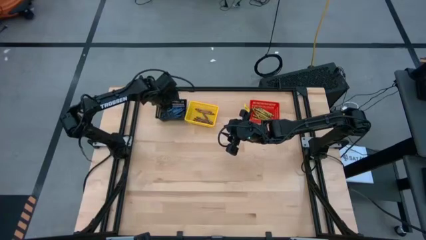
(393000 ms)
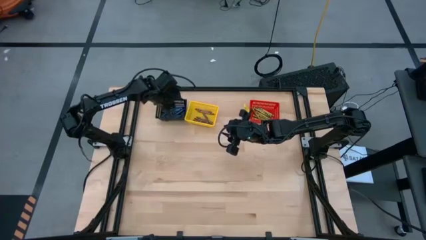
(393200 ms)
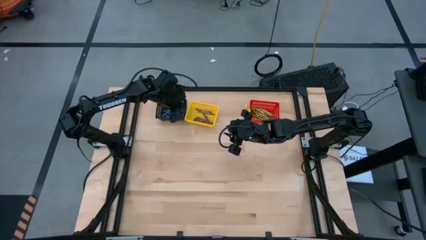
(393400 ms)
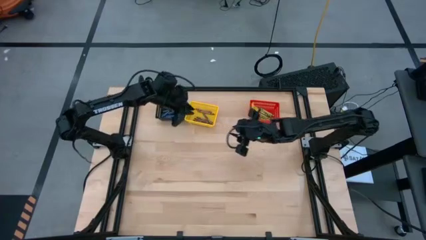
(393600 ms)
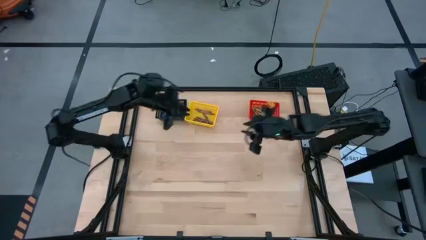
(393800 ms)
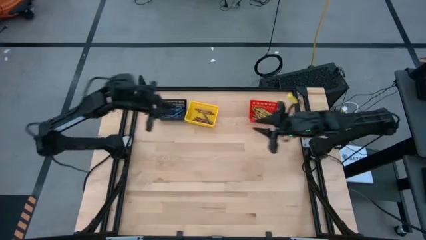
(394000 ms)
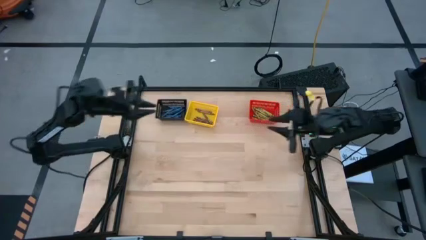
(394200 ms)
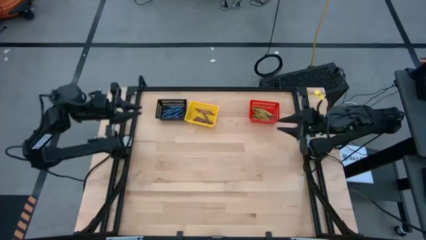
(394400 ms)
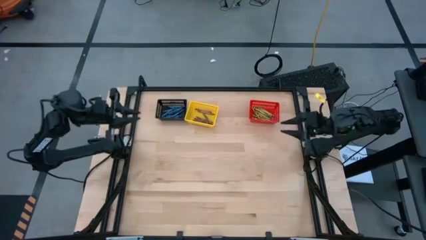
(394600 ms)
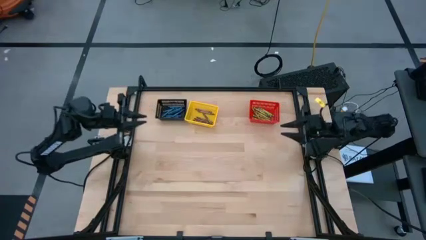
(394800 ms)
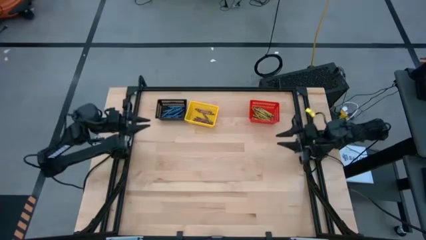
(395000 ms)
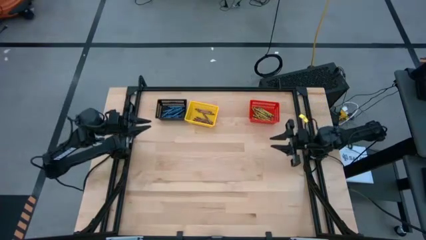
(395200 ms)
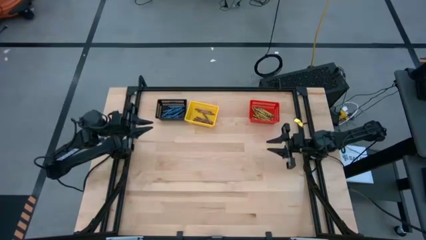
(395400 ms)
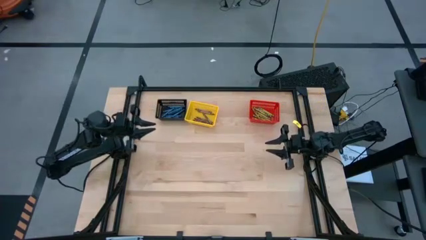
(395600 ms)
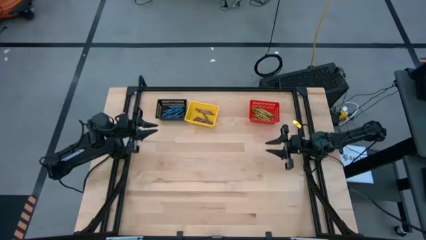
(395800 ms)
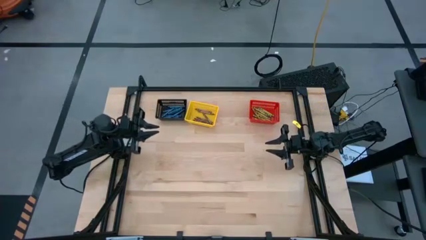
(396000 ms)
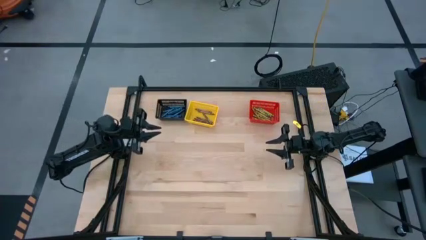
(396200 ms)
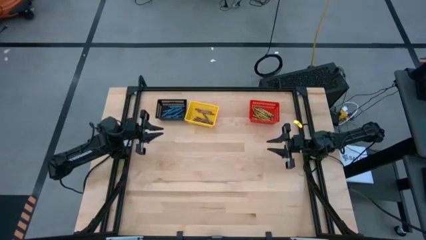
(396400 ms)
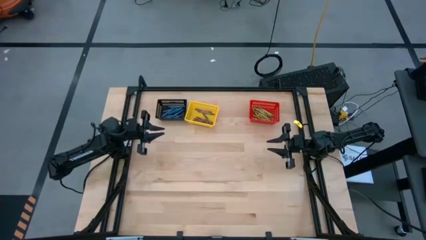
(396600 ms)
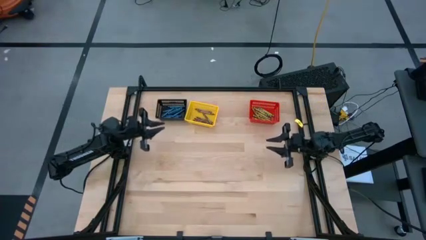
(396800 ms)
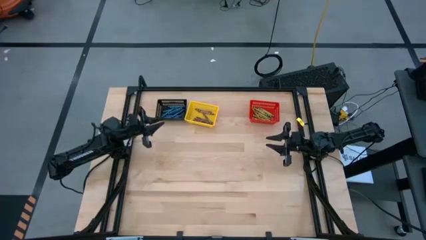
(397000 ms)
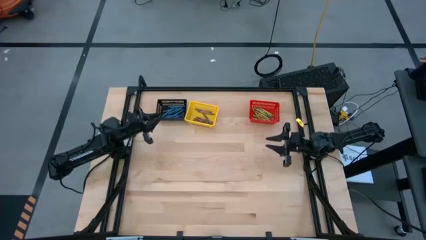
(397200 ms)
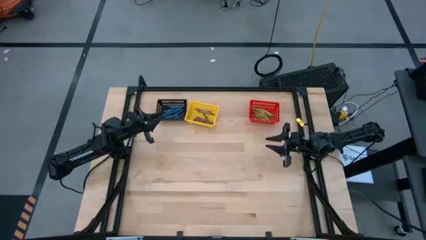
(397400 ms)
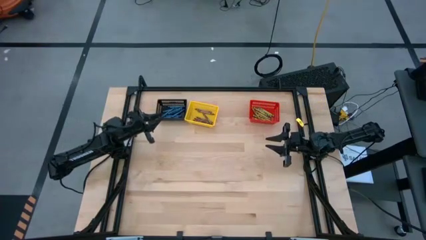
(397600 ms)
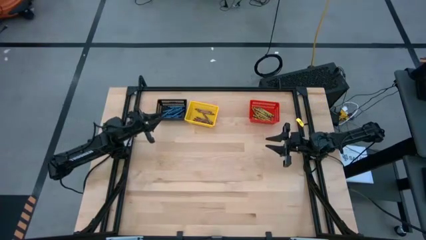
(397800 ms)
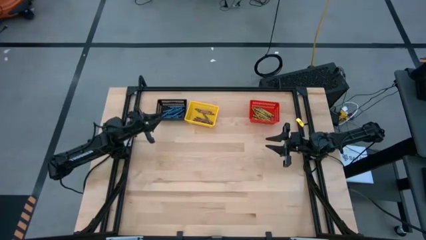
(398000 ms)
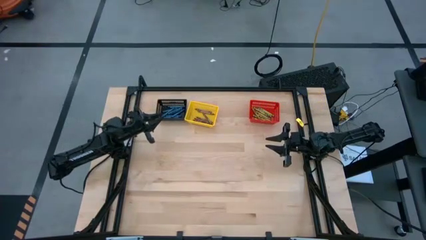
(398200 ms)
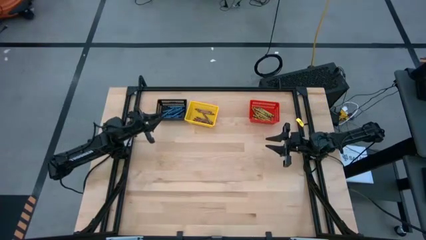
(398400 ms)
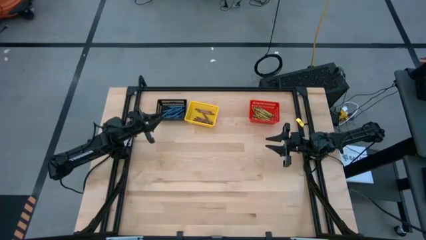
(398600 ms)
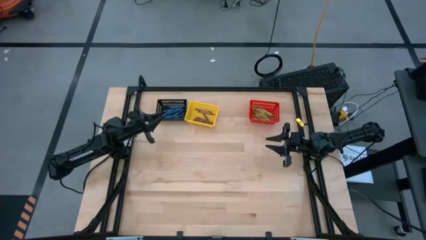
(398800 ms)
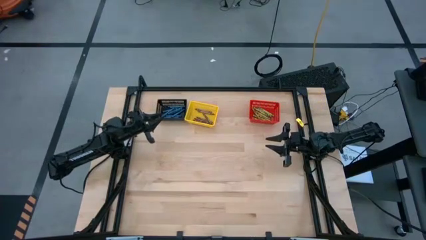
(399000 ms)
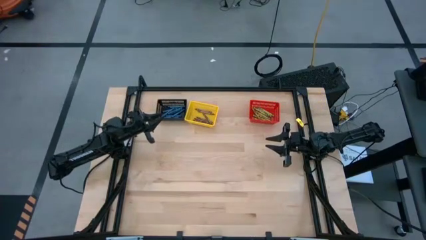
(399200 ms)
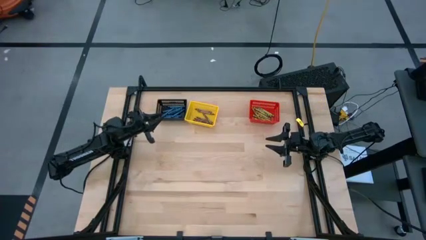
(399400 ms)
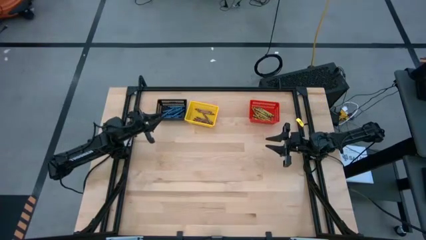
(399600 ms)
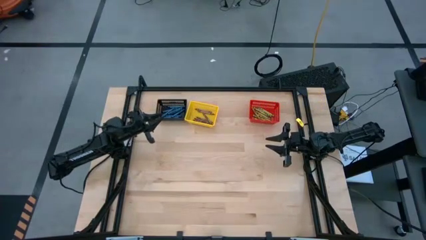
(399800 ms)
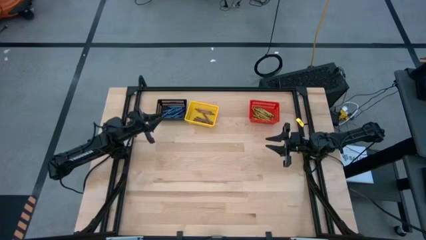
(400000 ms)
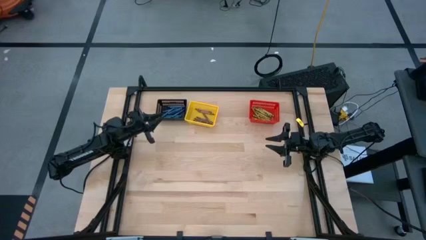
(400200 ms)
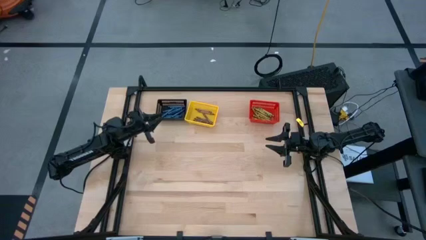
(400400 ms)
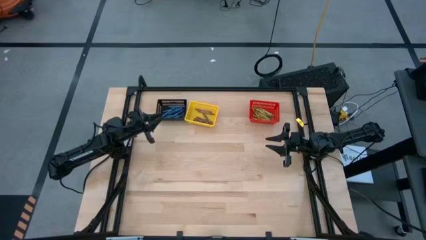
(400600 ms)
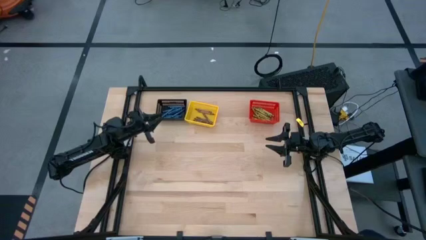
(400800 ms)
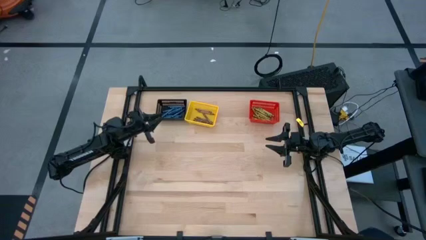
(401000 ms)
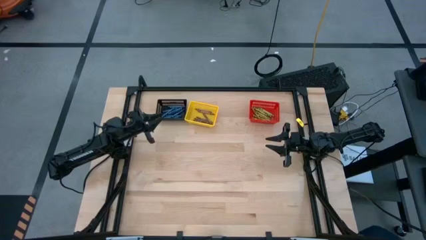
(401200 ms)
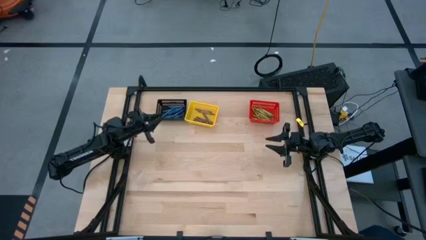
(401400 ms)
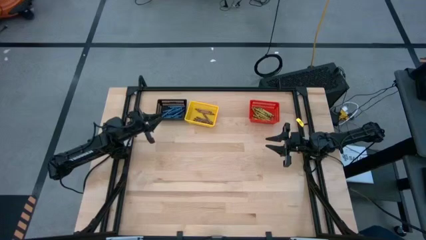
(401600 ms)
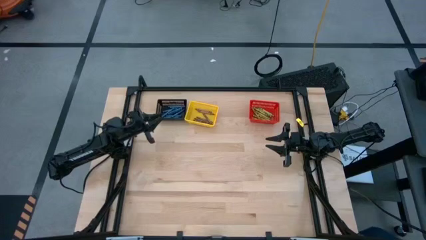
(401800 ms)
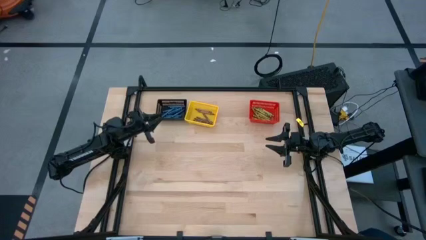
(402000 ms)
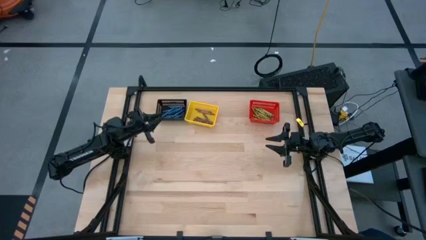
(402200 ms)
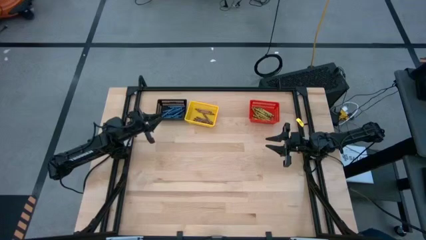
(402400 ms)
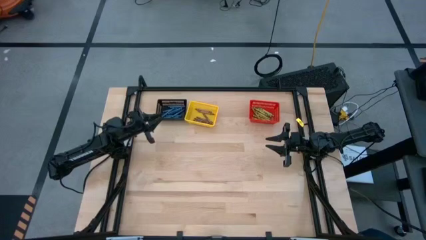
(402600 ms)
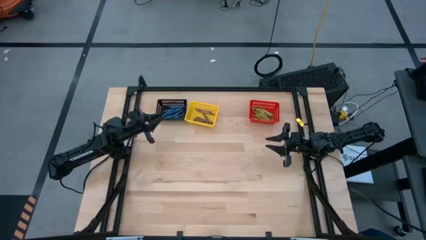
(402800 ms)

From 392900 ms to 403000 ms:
Task: Sort crayons
Return to Home Position

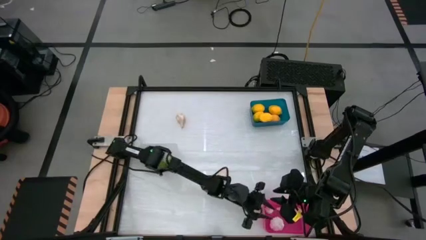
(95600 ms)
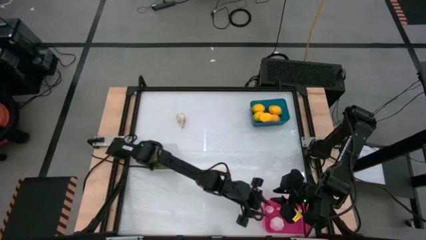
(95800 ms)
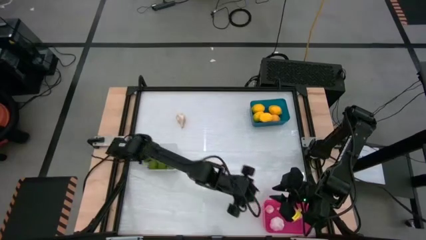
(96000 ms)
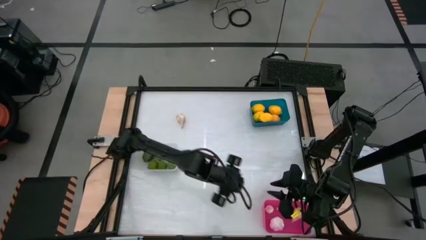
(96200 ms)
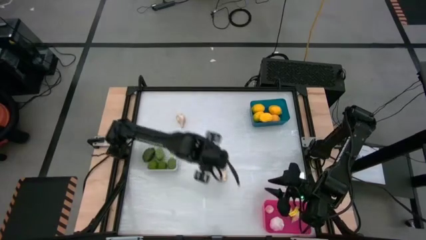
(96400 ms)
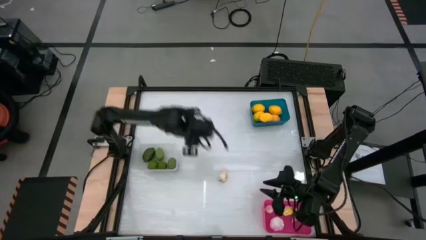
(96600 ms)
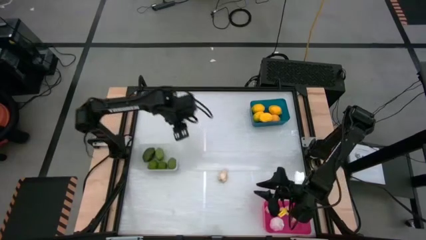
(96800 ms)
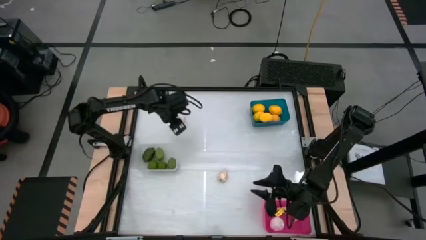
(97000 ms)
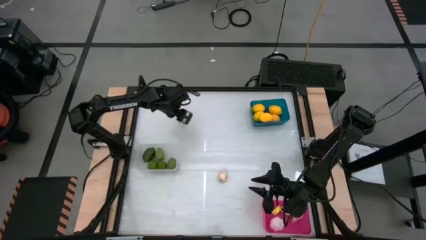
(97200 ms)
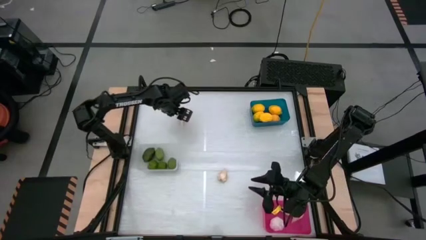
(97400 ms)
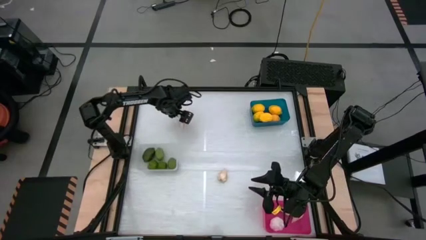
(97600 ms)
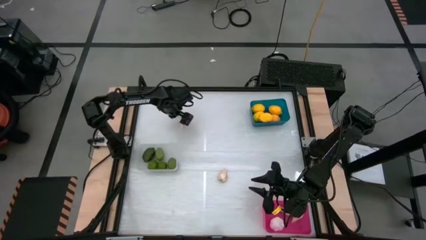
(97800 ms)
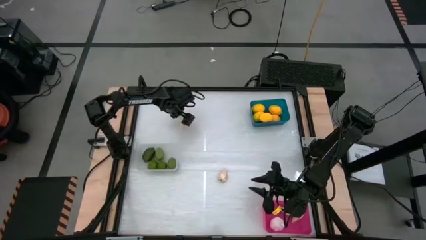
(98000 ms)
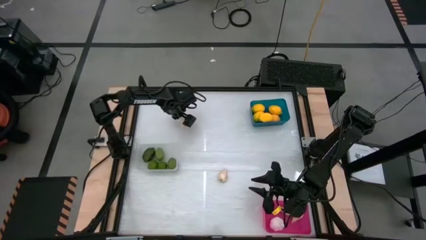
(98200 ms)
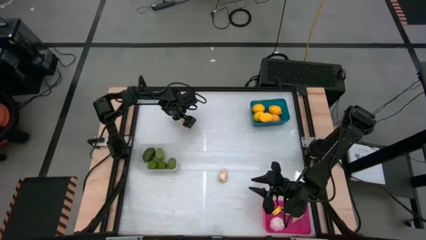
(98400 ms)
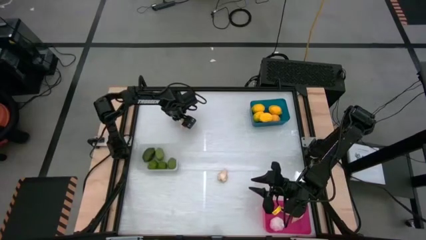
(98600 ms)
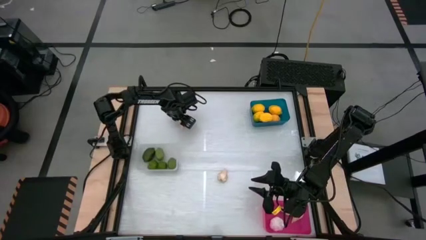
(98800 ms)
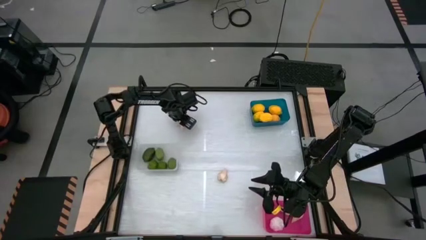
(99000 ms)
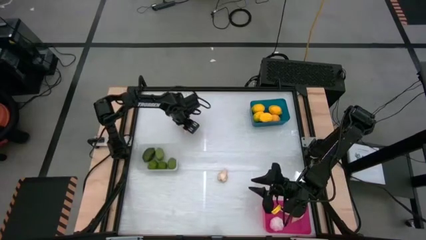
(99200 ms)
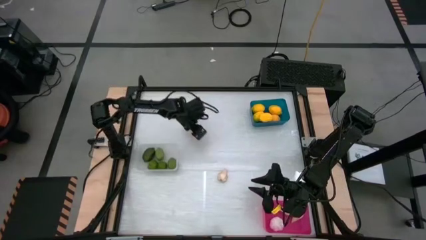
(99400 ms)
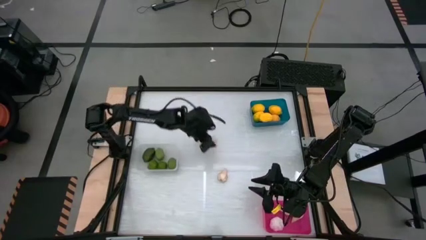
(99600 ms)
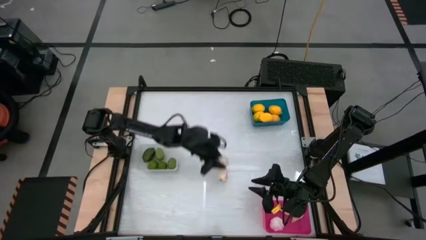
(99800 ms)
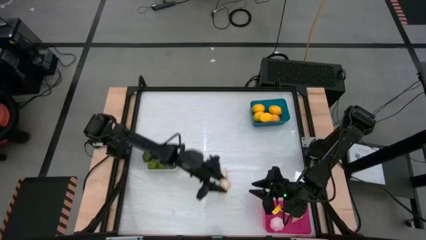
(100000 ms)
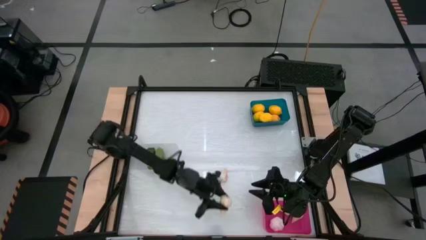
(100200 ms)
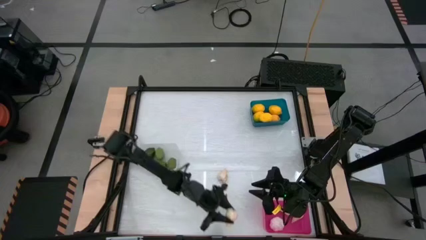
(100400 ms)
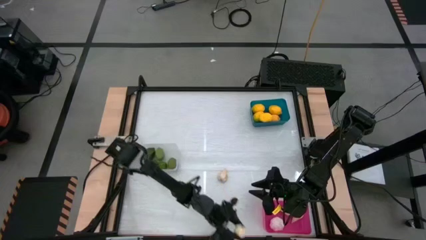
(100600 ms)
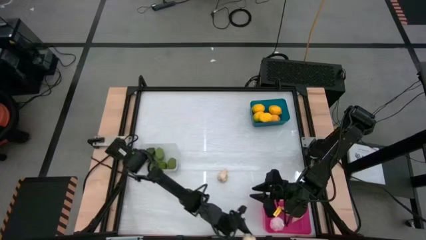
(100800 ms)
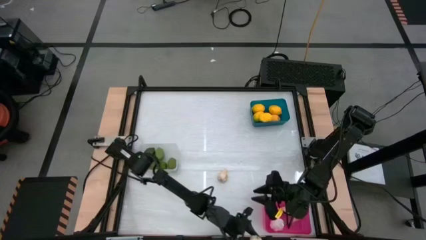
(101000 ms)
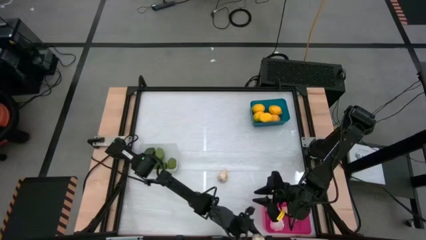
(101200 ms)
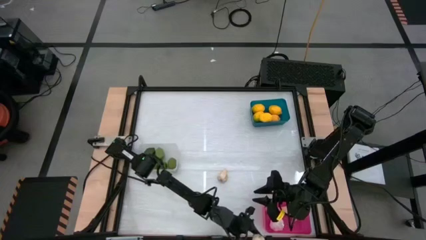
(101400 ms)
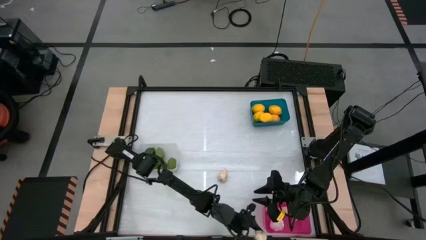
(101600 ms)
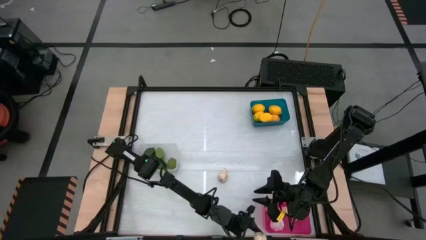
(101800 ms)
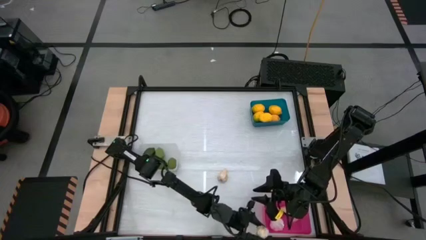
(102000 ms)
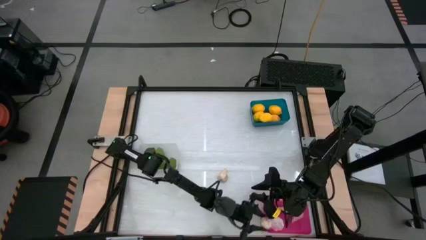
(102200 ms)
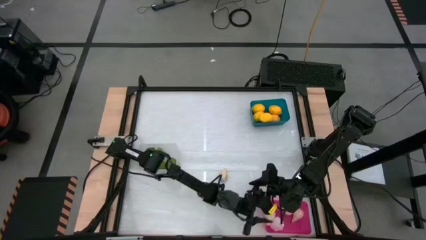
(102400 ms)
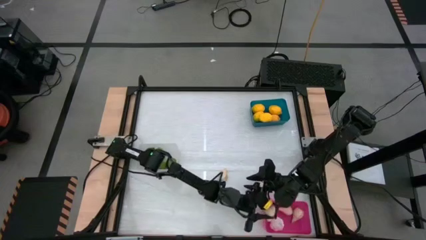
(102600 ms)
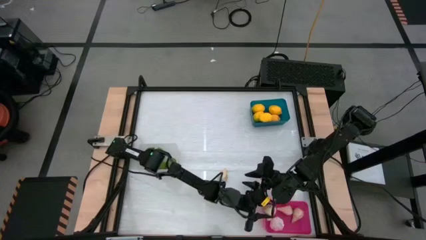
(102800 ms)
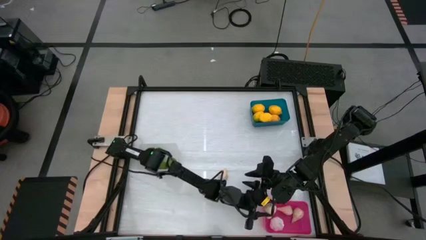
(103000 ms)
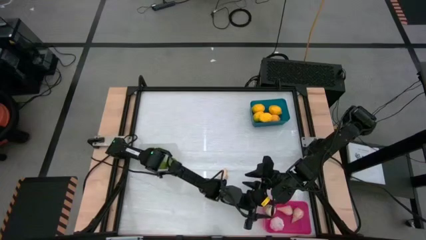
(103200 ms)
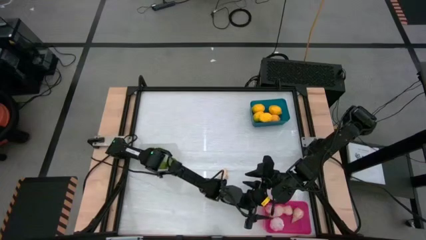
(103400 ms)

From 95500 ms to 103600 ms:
Task: Sort produce into baskets
Put the white garlic into the pink bin
